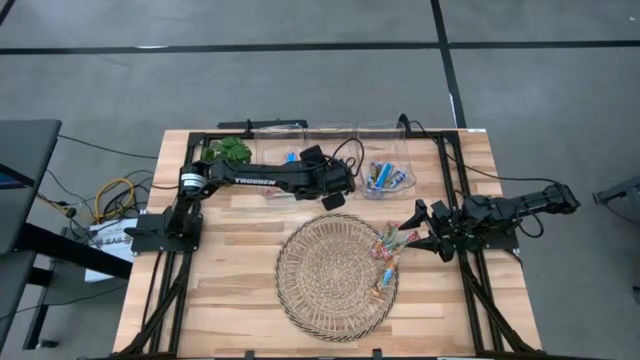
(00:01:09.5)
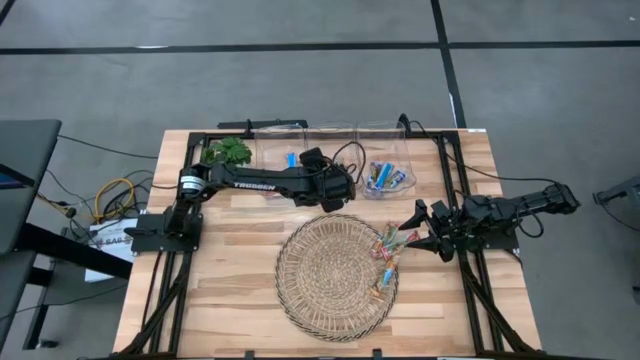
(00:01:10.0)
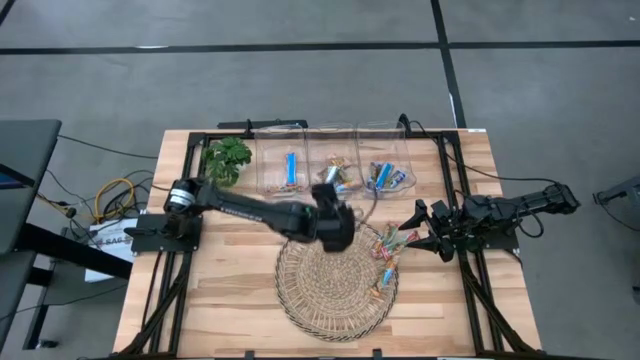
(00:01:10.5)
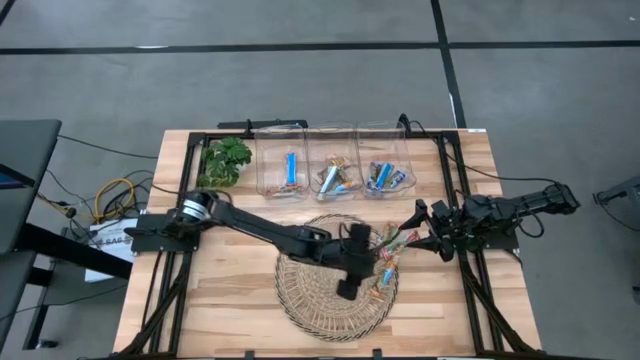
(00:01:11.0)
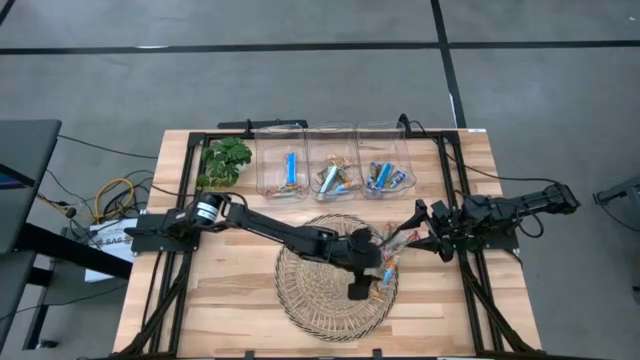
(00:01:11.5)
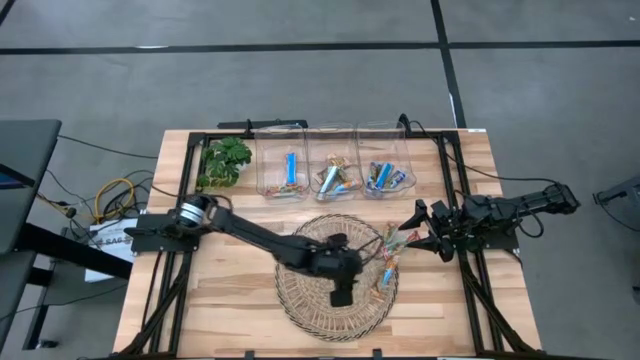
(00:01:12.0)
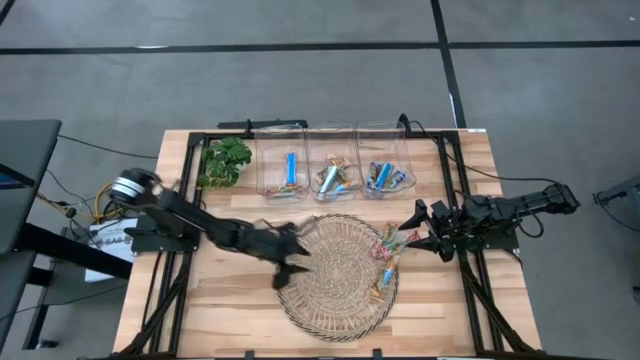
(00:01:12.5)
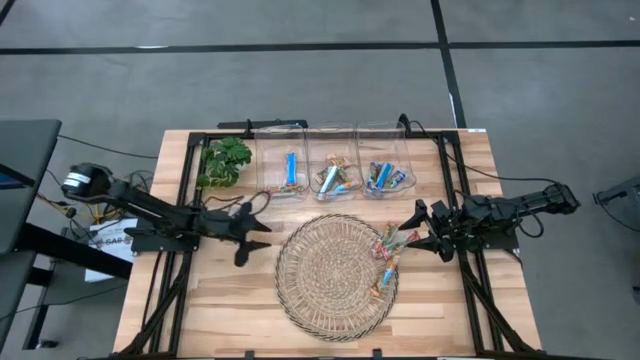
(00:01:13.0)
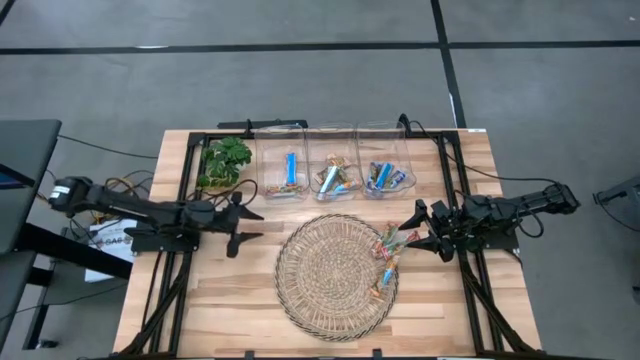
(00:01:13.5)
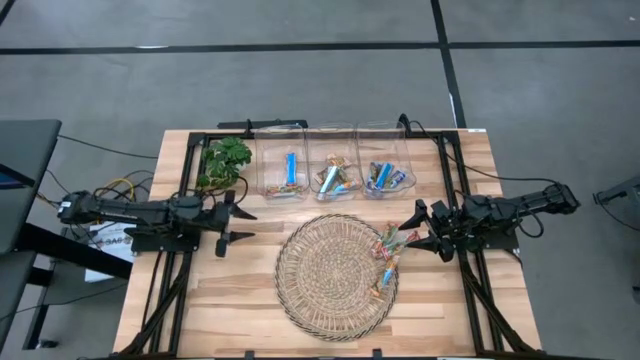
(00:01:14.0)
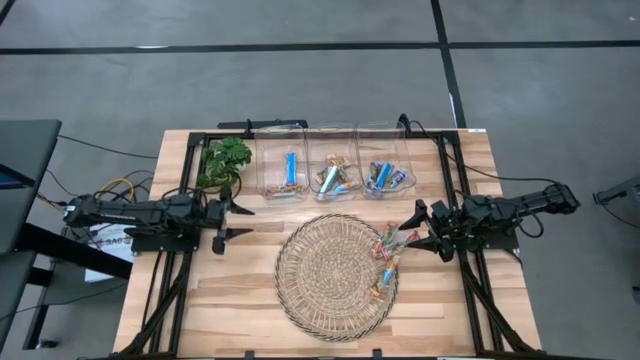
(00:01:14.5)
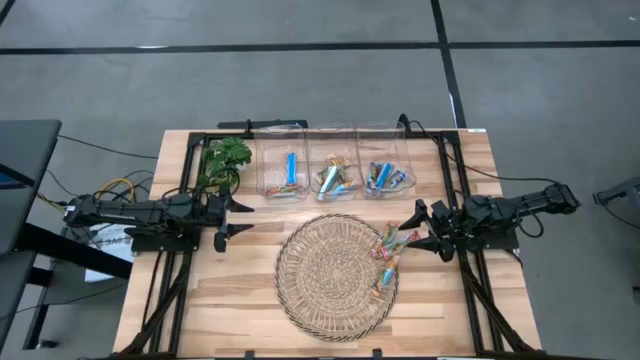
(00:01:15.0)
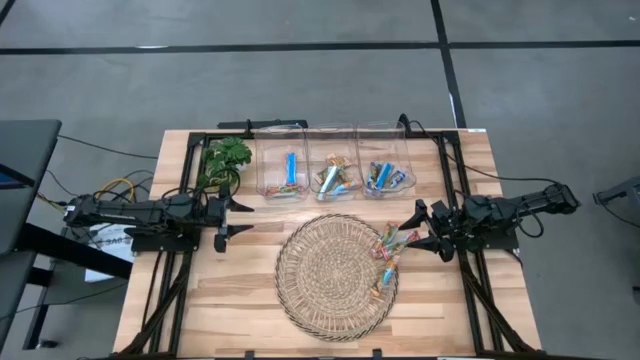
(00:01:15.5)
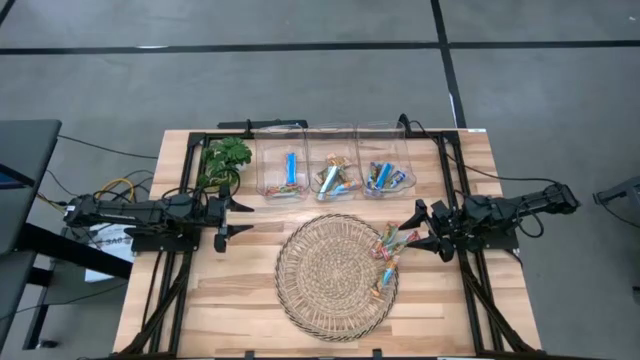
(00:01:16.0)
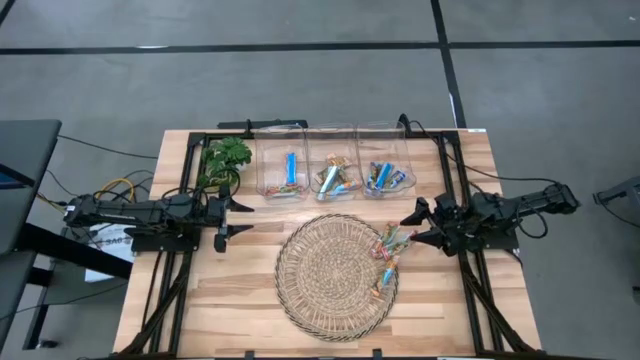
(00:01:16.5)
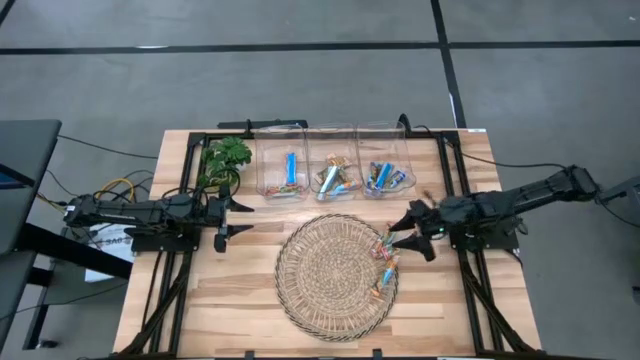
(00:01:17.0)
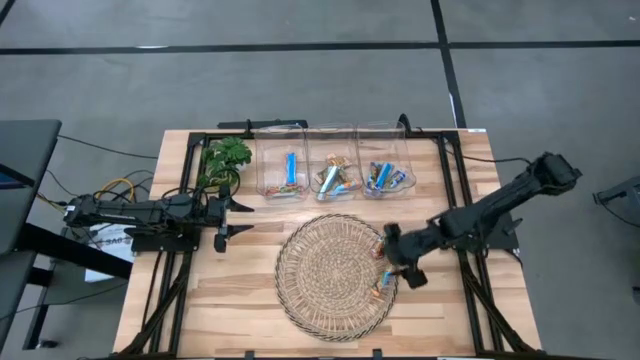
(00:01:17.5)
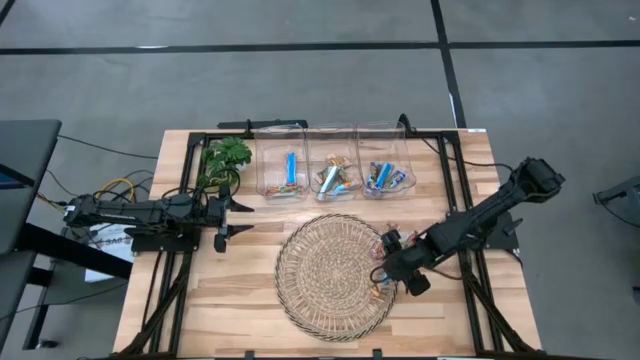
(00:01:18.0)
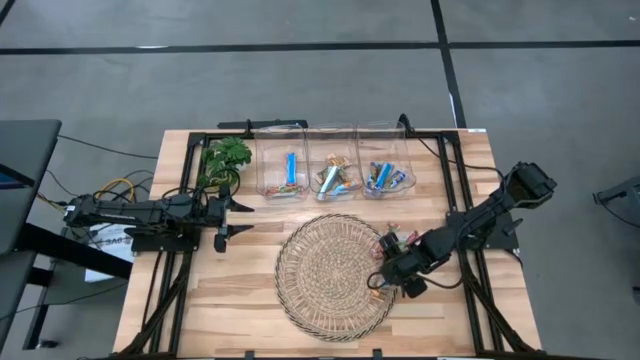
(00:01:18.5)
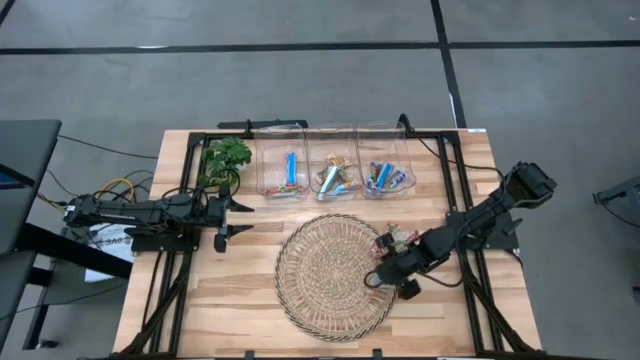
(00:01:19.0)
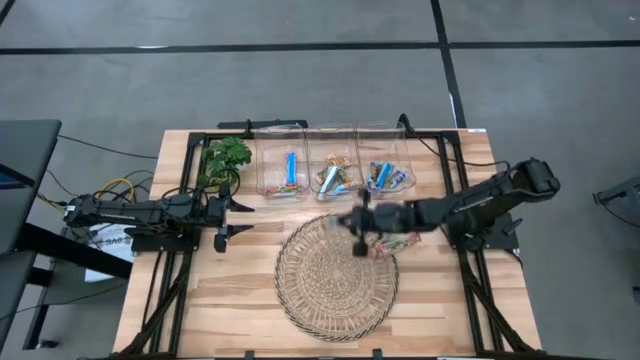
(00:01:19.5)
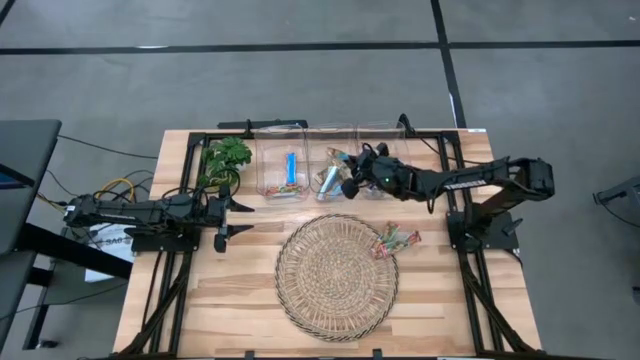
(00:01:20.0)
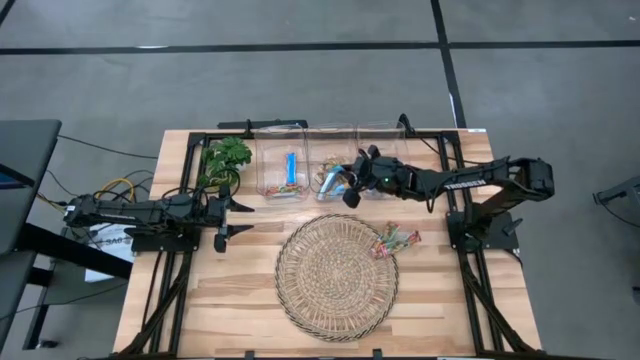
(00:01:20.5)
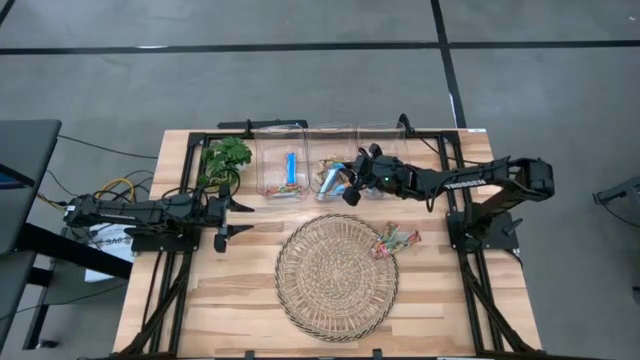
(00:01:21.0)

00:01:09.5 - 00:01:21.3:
Task: Pick and place Granola Bars by type
Put the yellow granola bar into the middle transparent bin

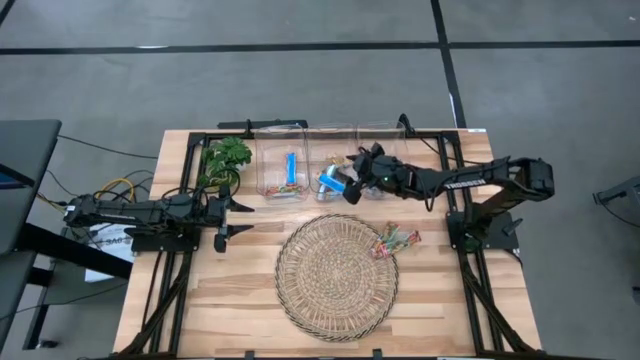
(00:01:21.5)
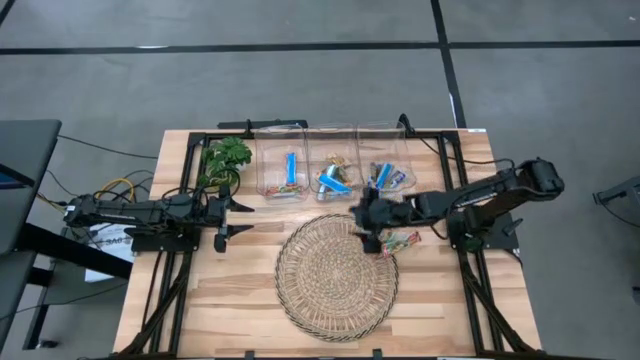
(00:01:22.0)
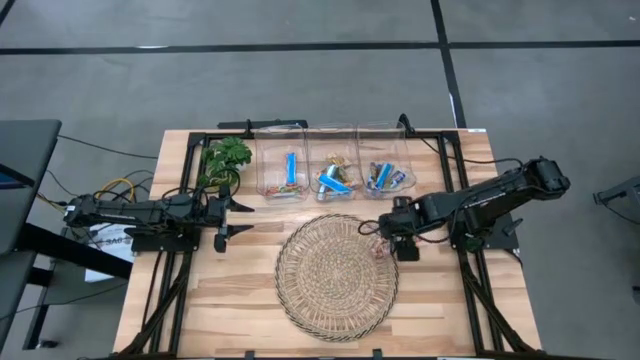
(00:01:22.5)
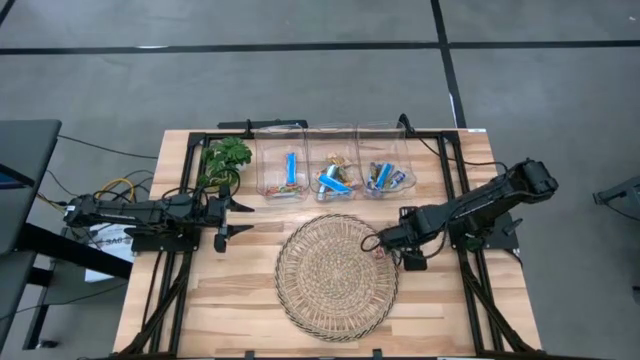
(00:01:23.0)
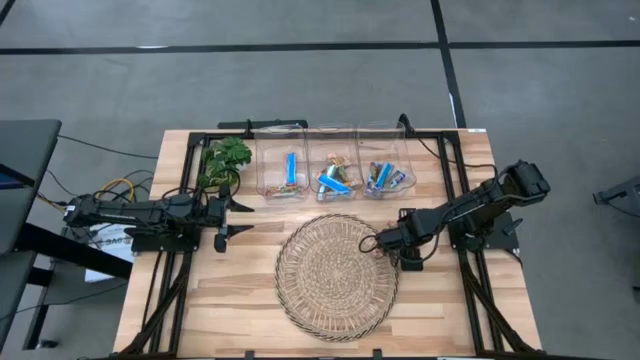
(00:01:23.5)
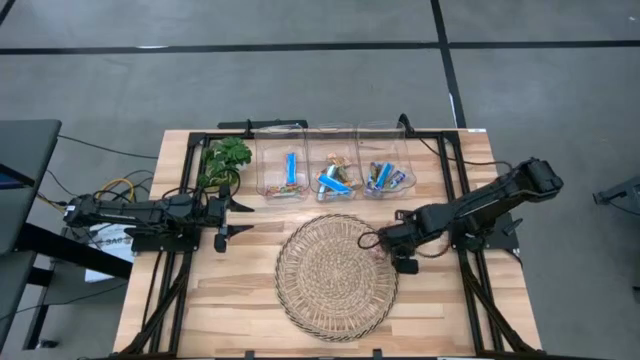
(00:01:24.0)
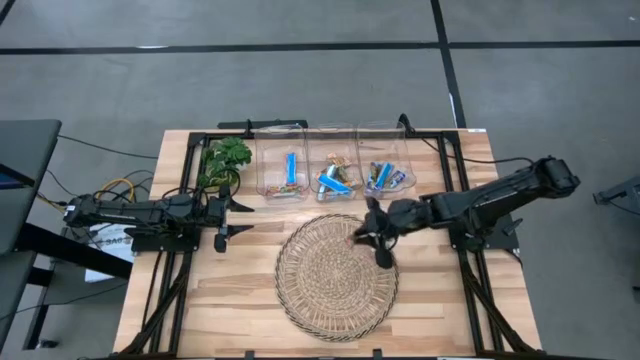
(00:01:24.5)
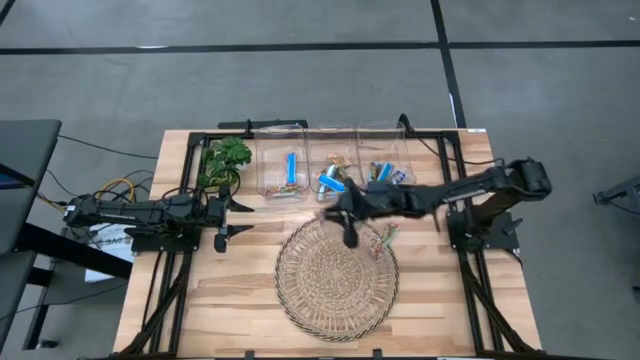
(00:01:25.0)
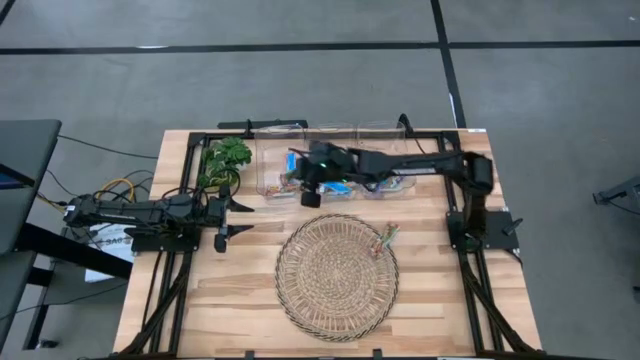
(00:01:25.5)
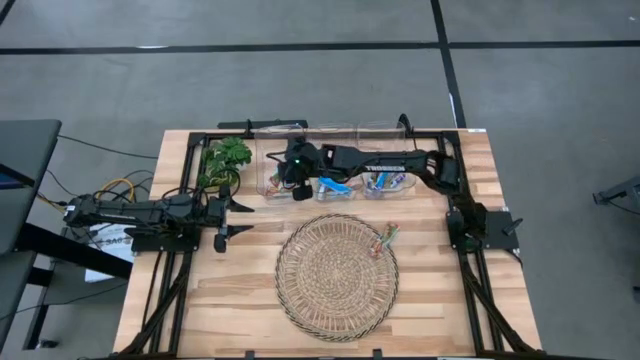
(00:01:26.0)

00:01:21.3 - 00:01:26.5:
Put the red granola bar into the left transparent bin

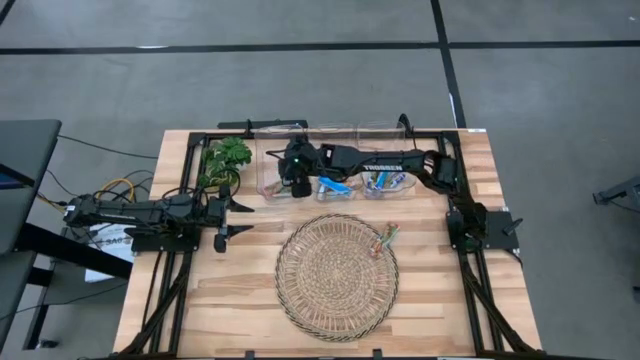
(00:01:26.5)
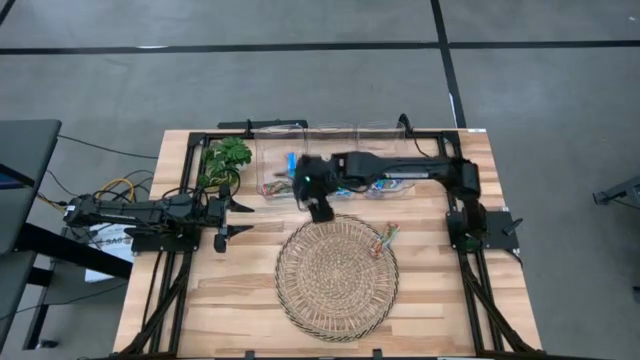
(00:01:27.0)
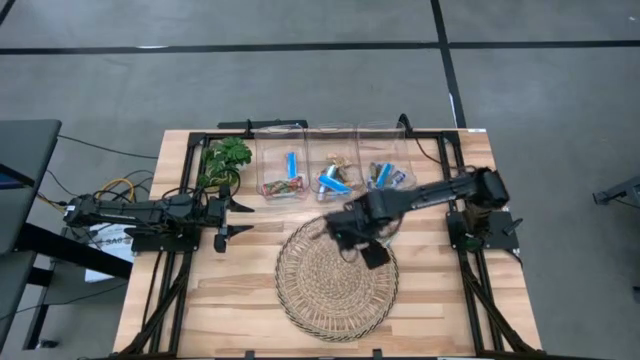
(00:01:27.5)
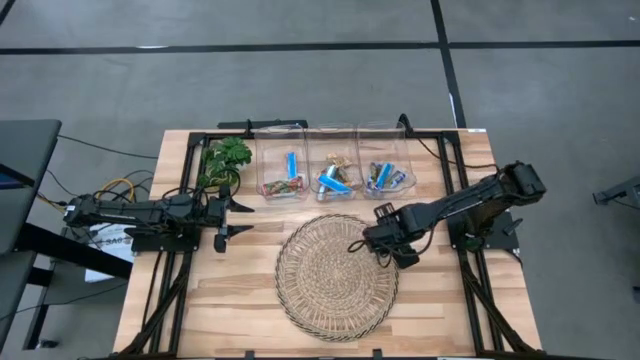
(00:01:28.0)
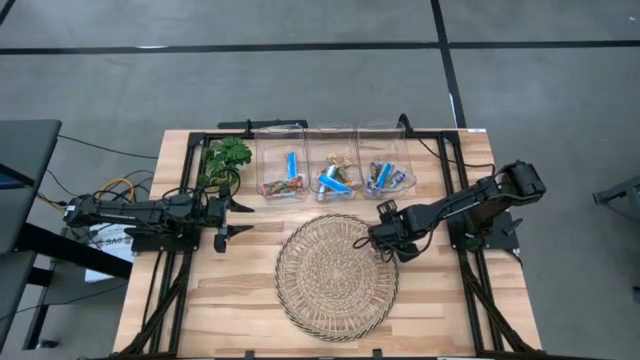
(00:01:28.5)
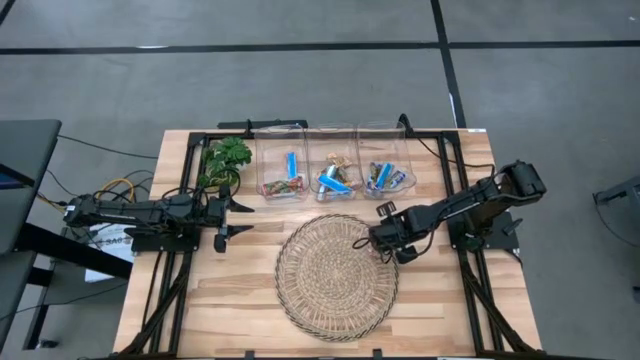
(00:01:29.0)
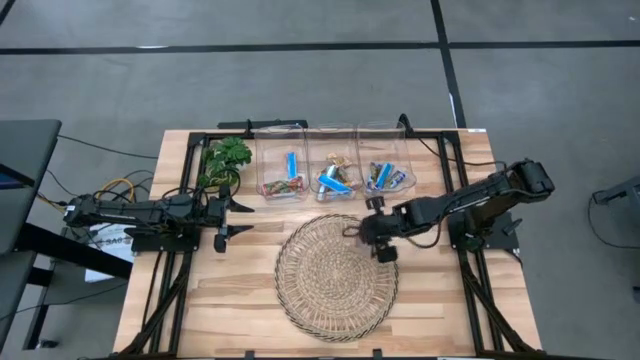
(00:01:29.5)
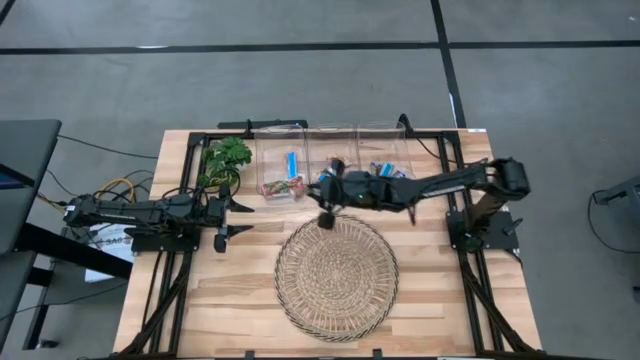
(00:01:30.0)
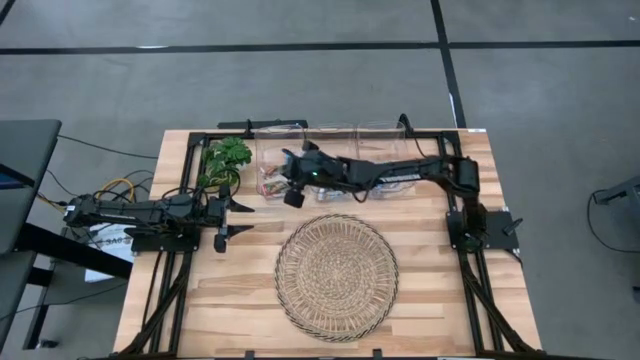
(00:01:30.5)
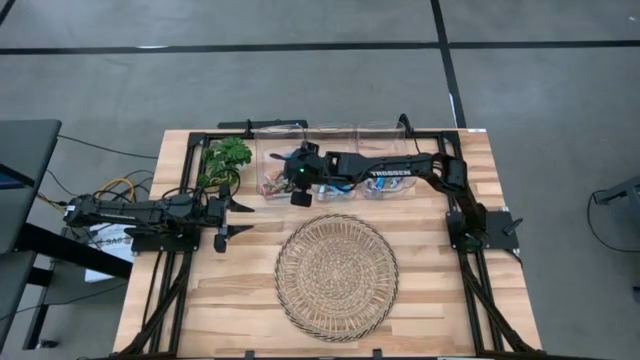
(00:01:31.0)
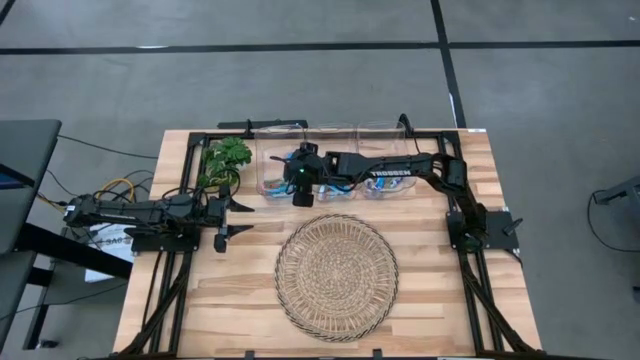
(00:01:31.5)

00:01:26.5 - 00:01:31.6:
Put the red granola bar into the left transparent bin
